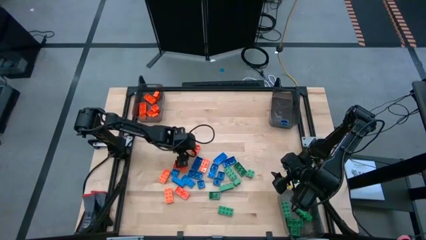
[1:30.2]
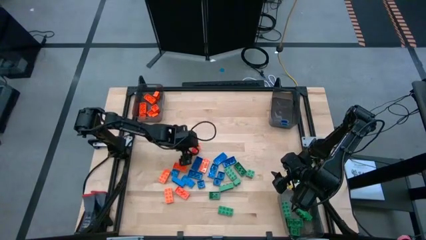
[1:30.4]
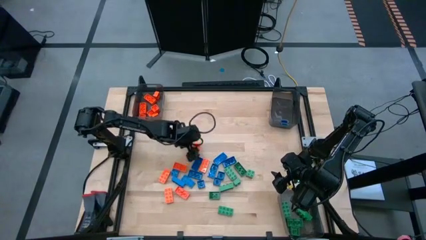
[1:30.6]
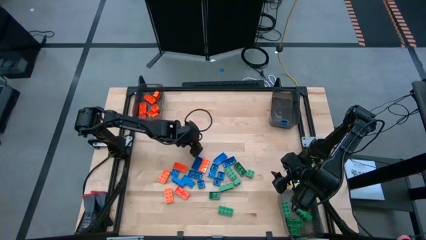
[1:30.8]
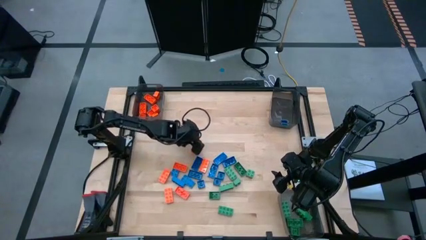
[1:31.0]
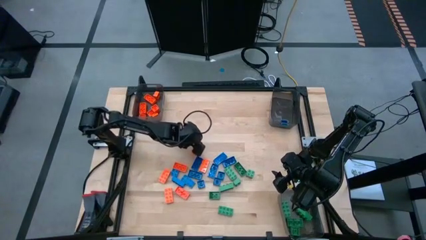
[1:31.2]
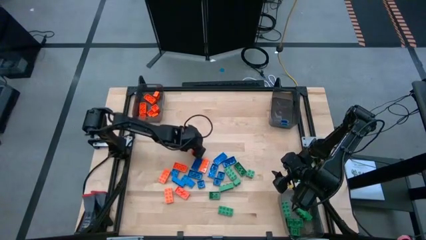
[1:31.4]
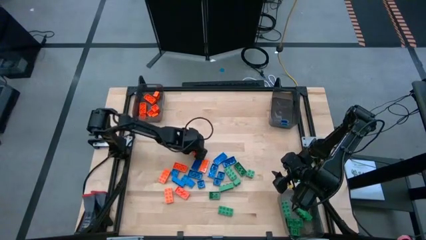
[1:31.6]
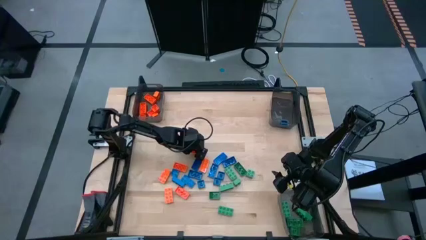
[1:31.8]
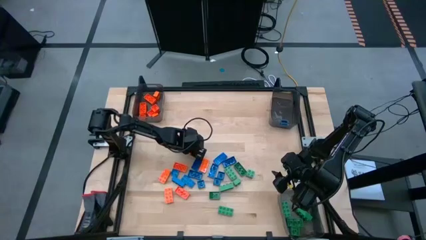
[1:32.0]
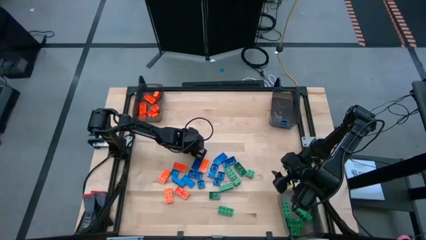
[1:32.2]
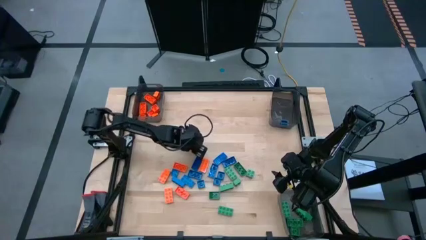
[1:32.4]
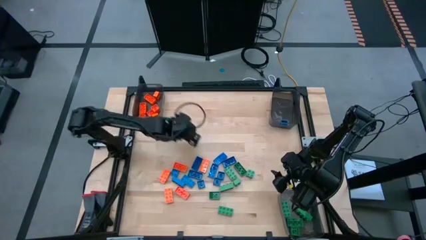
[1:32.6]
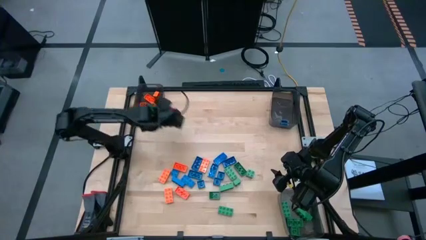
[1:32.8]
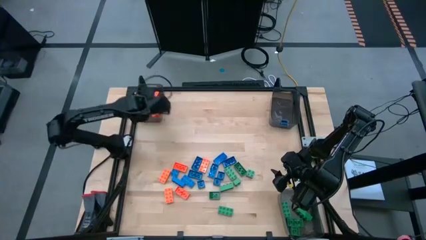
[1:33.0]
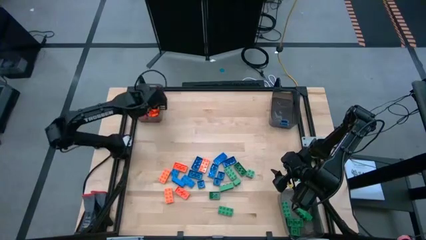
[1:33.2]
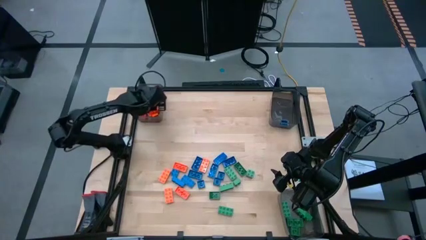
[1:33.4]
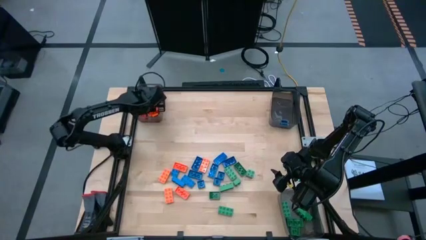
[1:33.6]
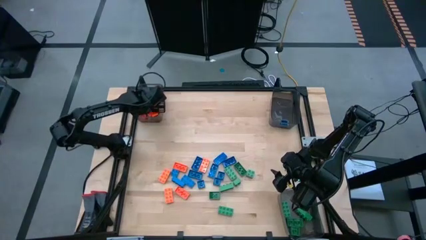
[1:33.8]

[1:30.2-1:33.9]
Task: Sort blocks
Put the orange game piece into the top left black bin

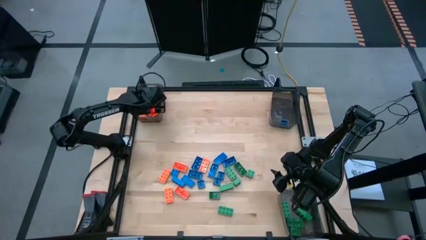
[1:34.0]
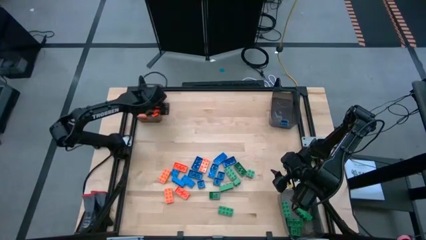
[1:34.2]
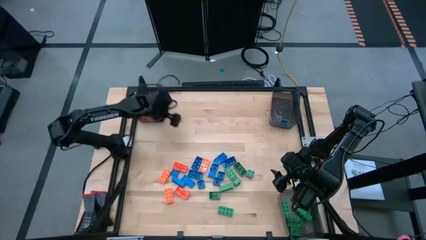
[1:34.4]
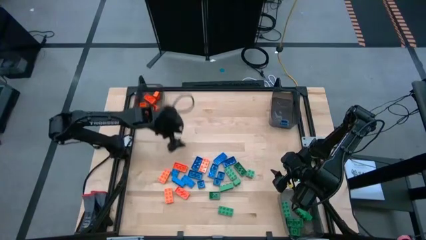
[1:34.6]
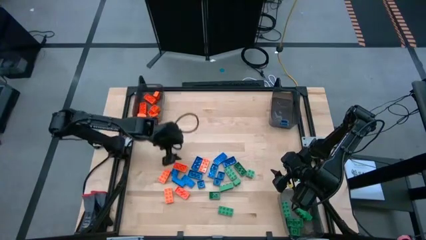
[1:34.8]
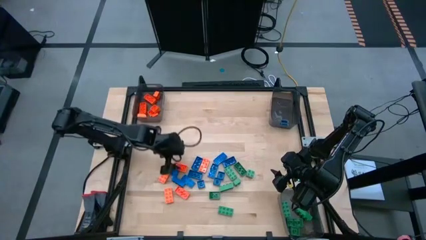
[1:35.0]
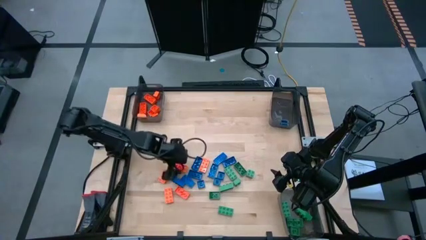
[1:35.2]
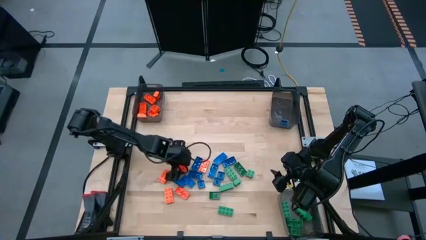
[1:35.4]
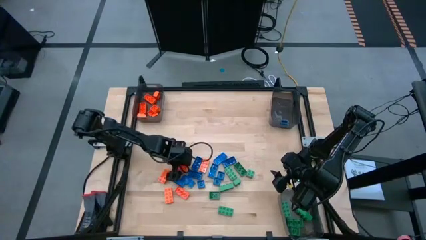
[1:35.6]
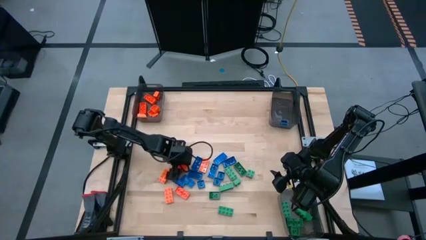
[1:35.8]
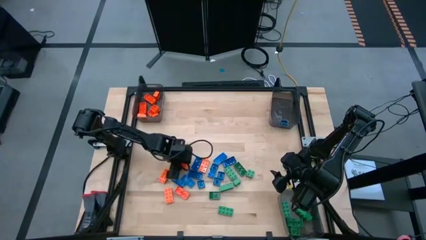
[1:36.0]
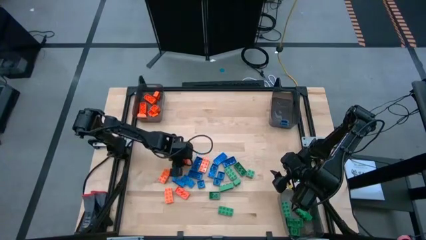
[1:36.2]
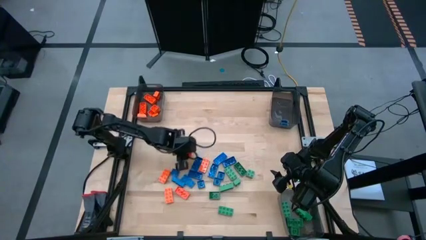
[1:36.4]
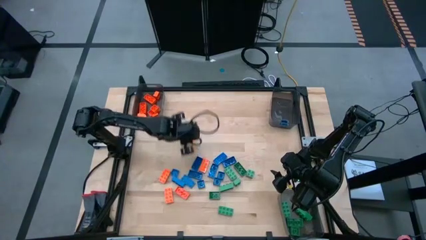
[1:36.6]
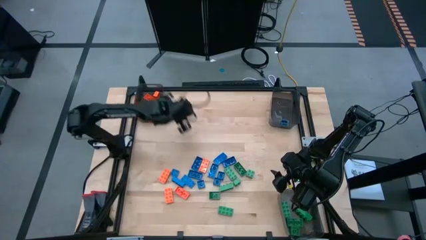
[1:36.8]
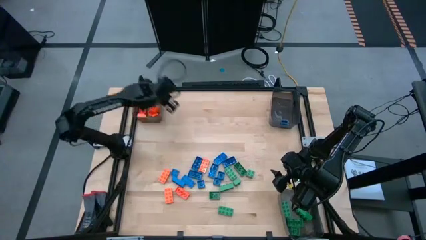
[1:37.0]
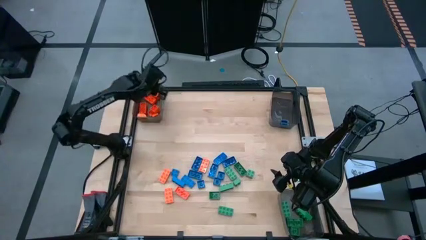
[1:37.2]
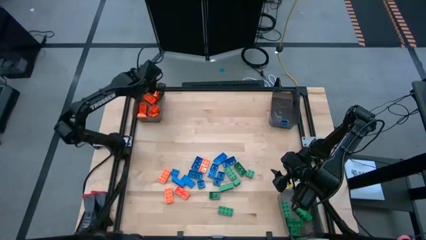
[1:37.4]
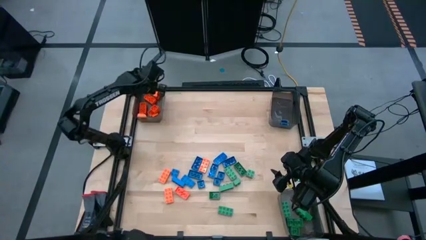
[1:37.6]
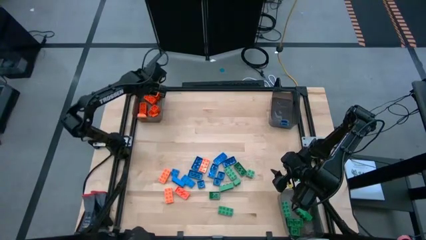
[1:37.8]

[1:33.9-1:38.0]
Put the orange game piece into the top left black bin

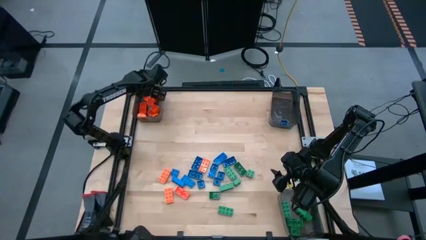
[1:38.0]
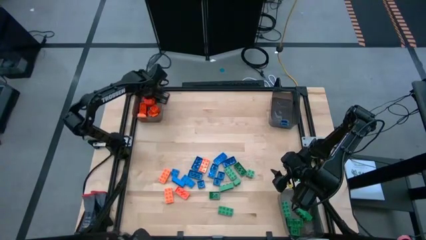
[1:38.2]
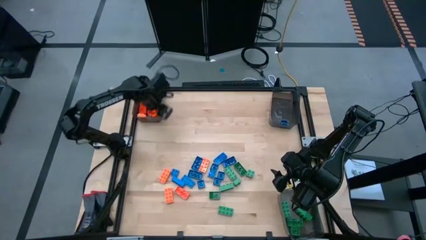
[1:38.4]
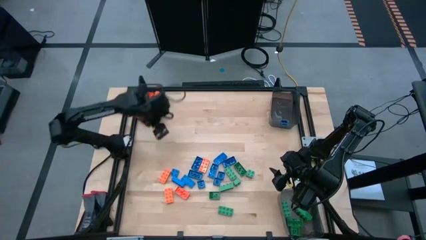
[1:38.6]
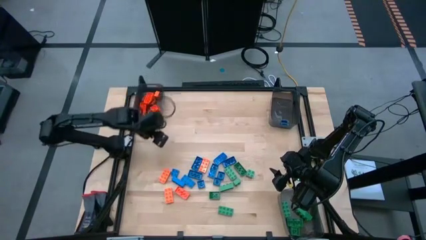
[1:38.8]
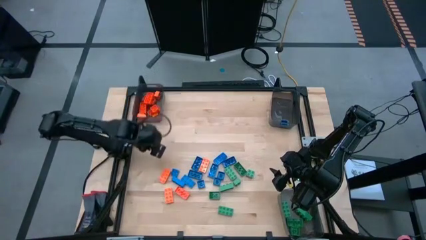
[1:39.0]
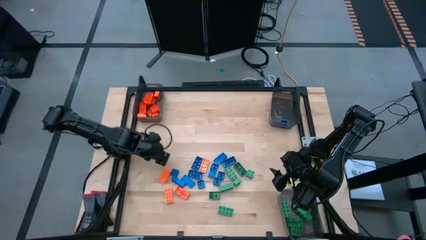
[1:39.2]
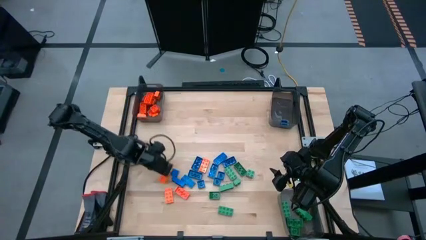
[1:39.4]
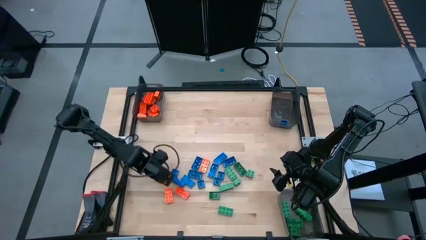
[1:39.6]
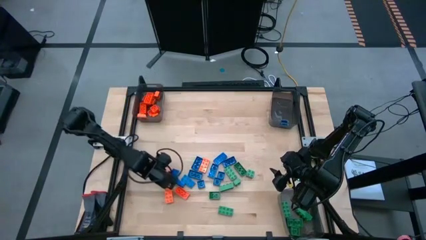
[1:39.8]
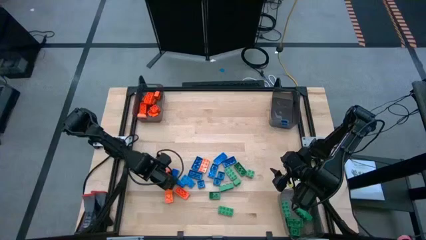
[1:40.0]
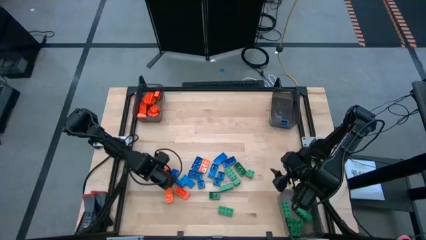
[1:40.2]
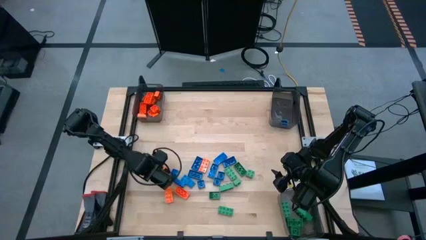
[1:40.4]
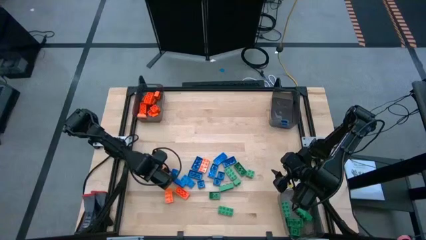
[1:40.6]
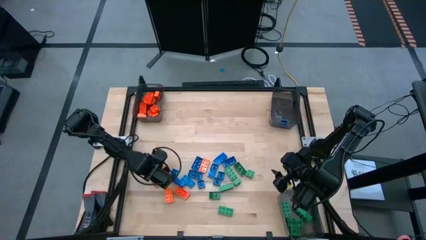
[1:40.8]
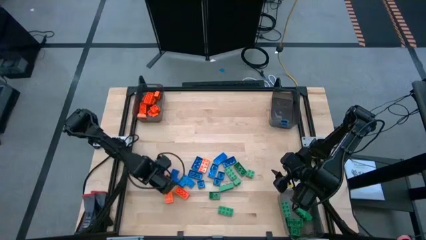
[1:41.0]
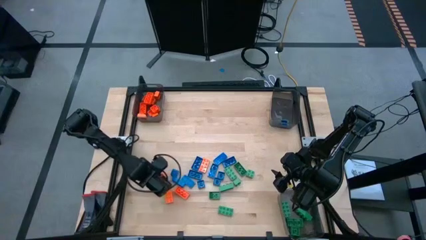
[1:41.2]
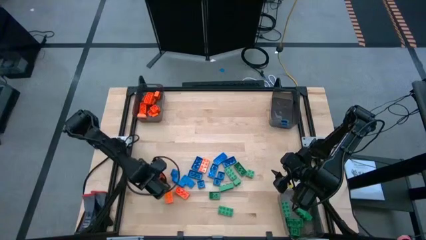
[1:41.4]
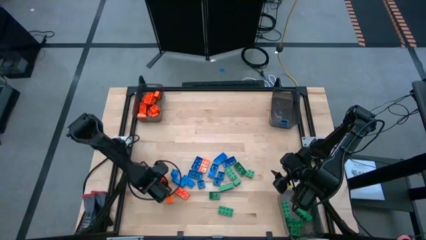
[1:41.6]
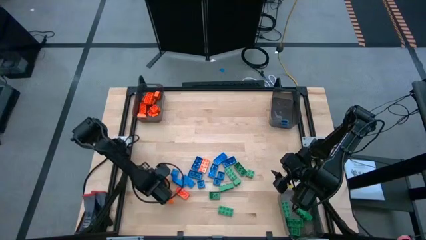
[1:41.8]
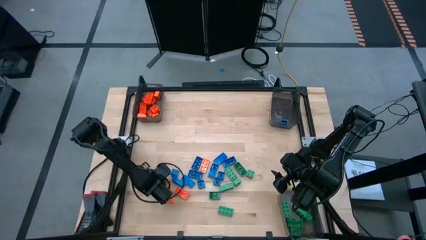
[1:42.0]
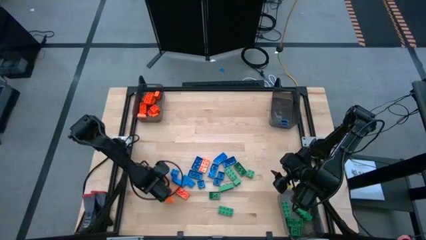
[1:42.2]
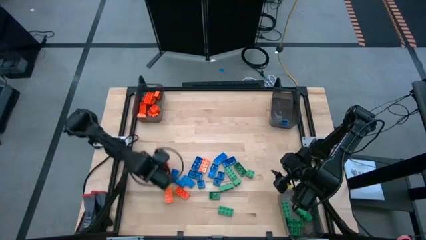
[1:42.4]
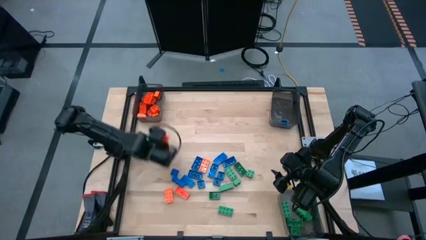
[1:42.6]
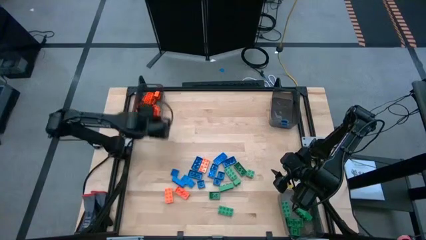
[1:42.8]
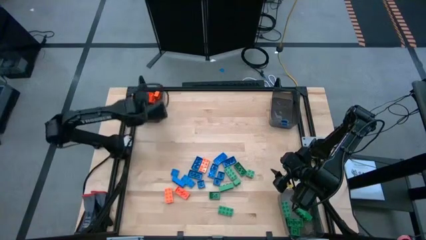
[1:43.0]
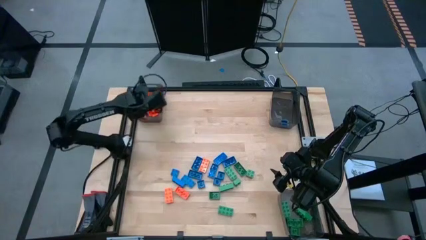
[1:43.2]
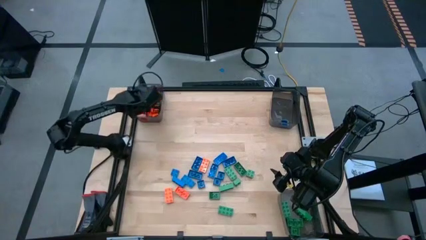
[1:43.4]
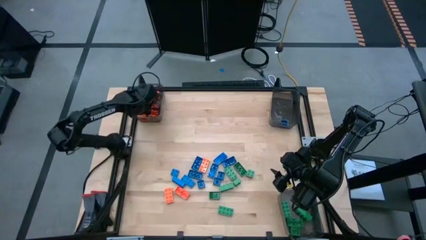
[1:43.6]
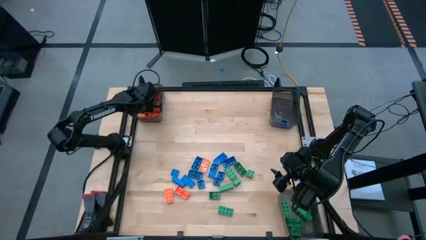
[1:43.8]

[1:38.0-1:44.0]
Put the orange game piece into the top left black bin

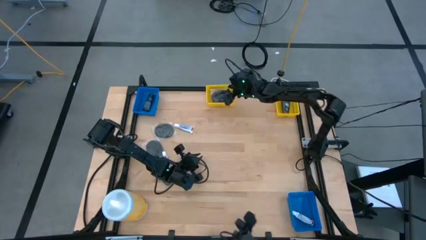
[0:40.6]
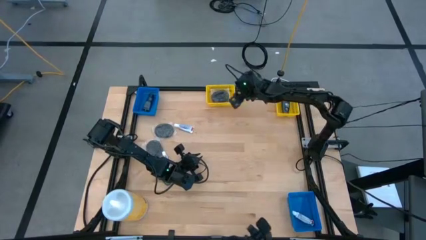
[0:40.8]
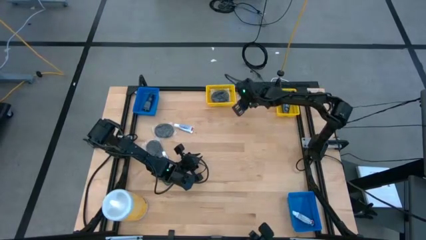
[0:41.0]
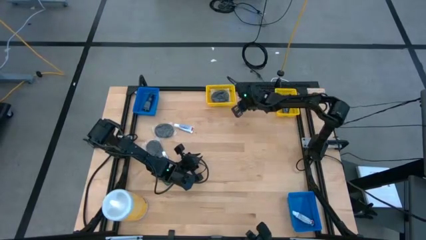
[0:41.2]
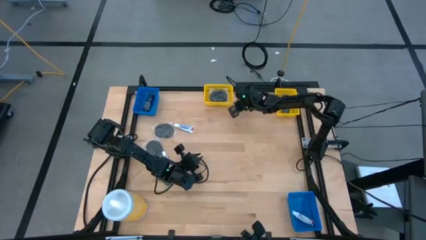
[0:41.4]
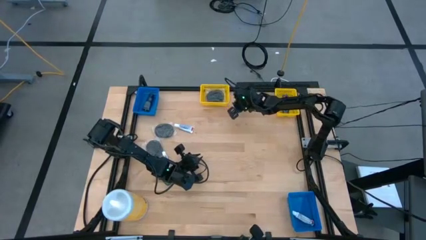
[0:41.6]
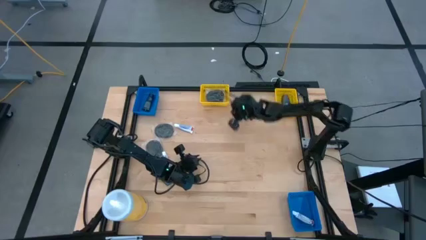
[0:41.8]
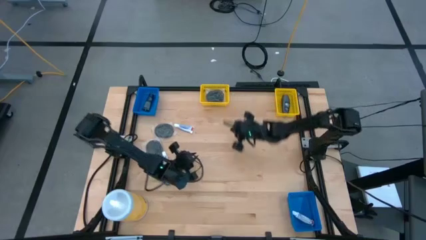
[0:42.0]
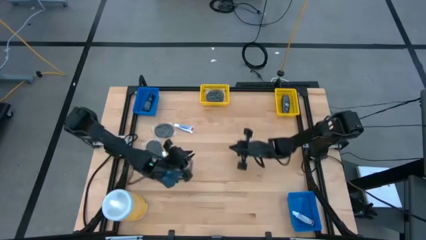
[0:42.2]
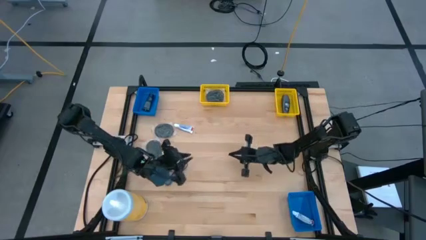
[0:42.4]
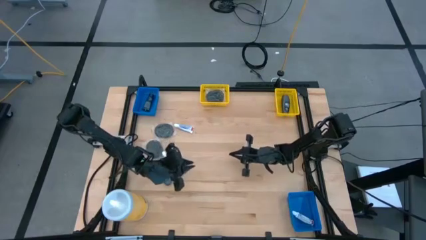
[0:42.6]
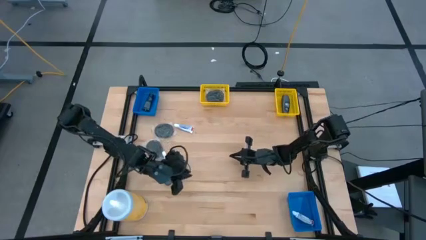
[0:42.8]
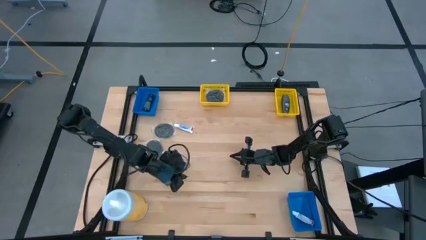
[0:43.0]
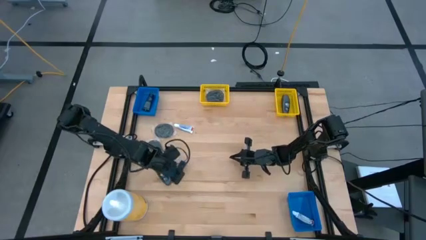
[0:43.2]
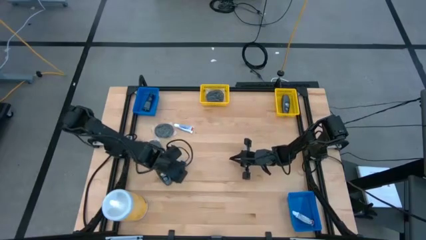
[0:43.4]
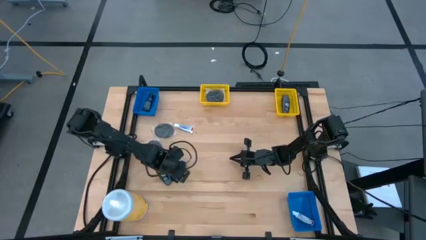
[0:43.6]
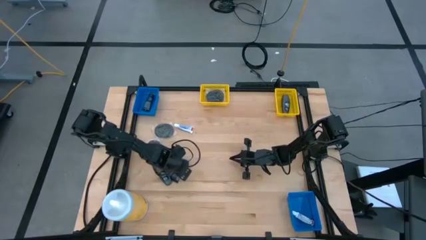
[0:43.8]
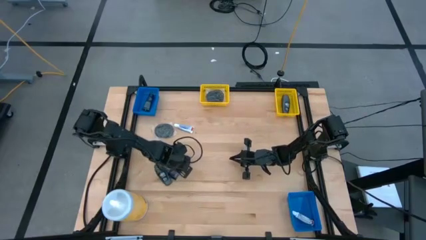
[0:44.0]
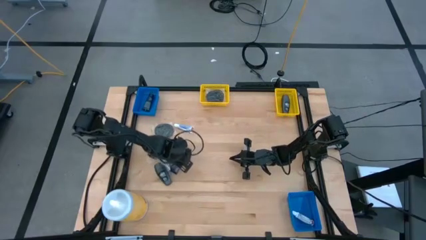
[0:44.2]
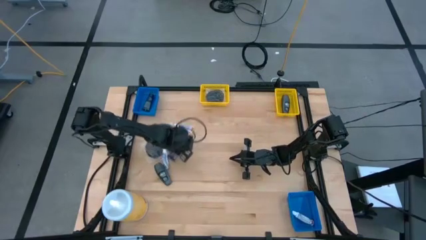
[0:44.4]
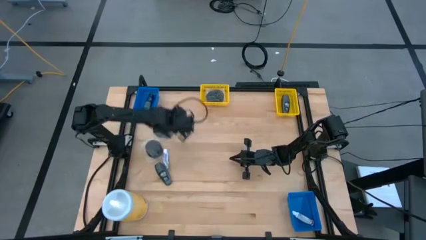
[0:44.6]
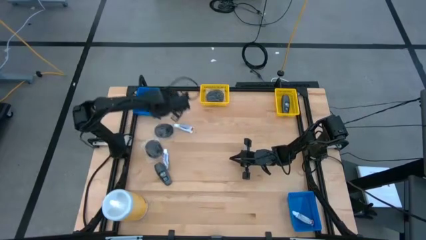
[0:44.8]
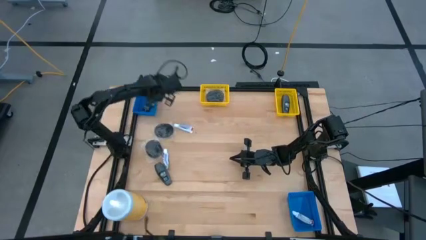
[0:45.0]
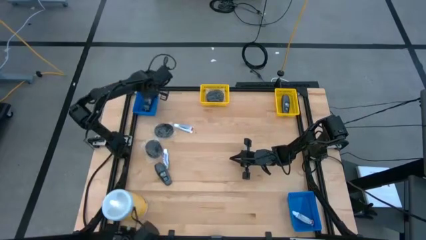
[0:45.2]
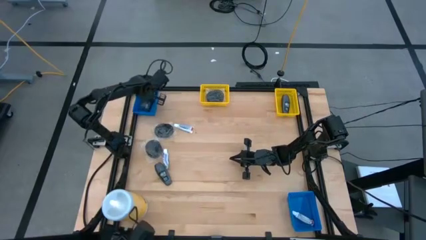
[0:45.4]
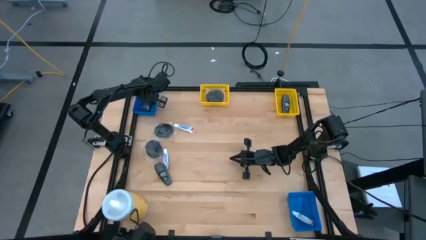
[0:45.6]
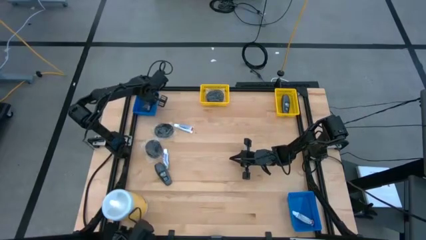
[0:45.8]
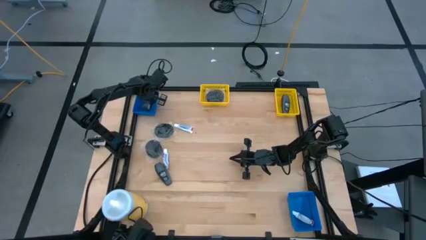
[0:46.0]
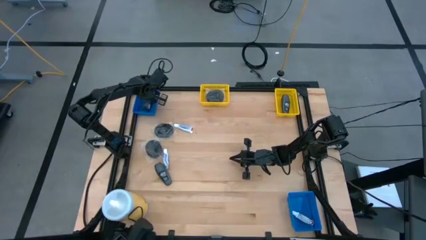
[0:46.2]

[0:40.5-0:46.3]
Task: Pick & Place Travel size toiletries
Put the shave cream into the top blue bin
